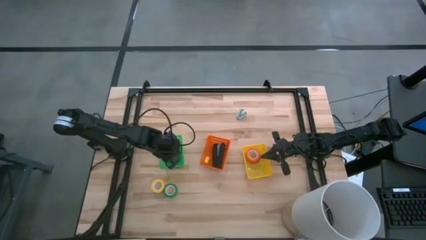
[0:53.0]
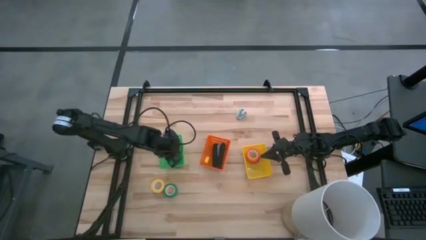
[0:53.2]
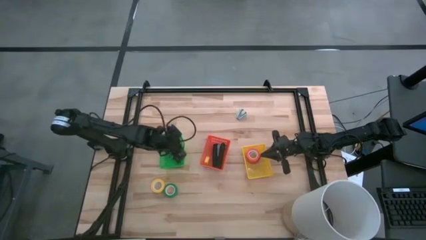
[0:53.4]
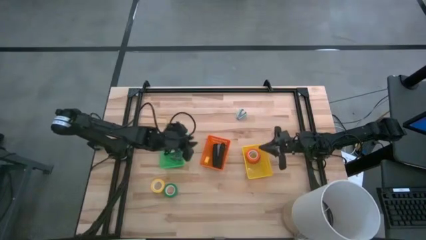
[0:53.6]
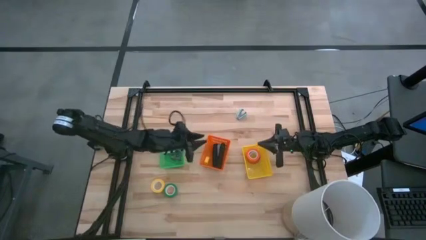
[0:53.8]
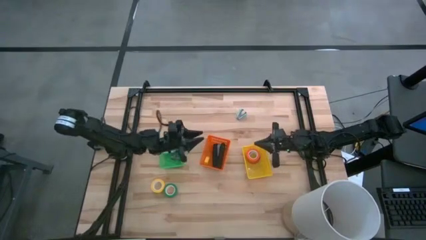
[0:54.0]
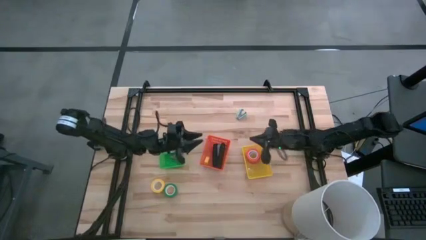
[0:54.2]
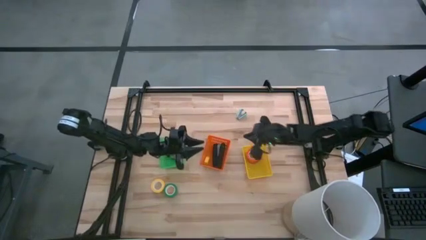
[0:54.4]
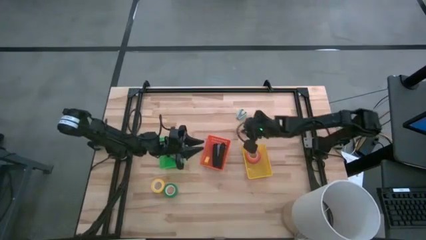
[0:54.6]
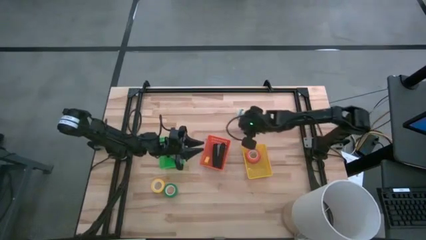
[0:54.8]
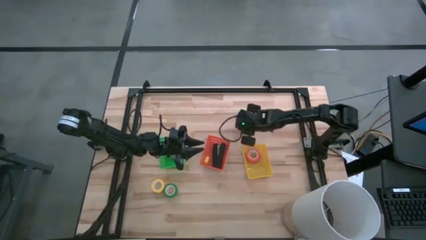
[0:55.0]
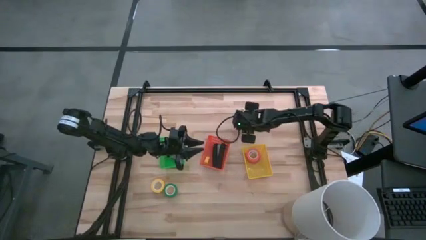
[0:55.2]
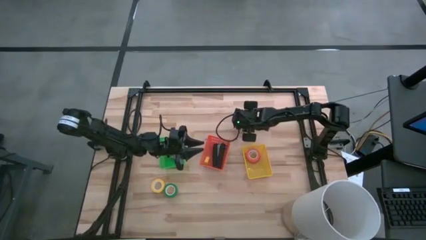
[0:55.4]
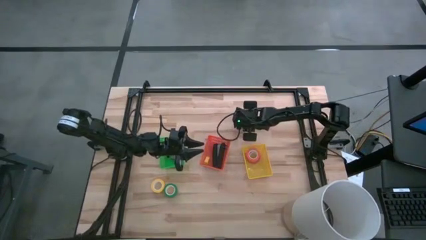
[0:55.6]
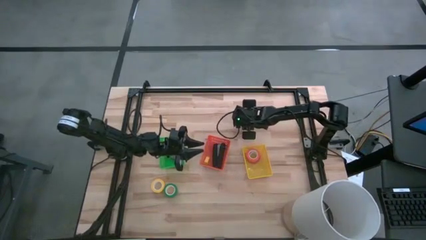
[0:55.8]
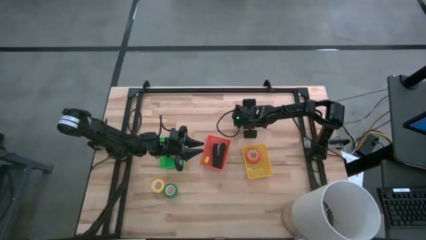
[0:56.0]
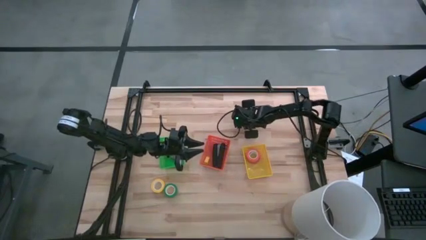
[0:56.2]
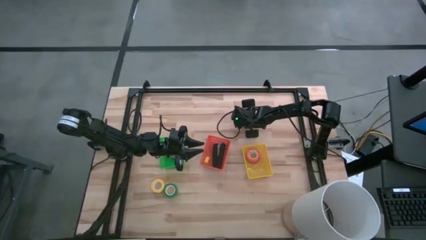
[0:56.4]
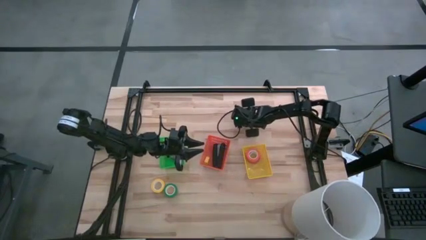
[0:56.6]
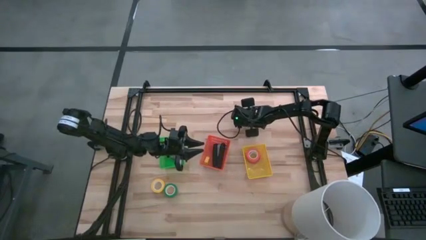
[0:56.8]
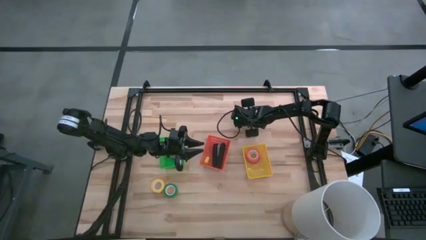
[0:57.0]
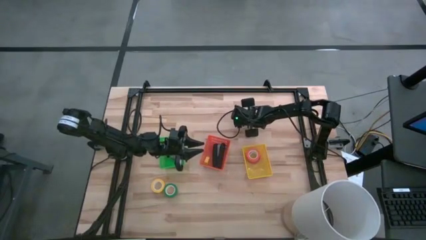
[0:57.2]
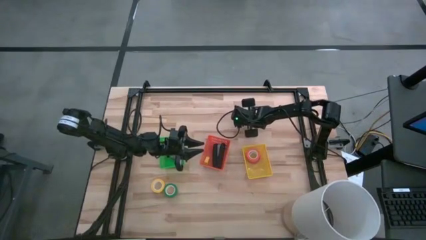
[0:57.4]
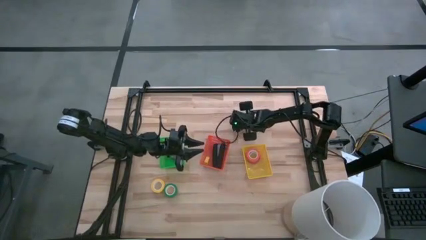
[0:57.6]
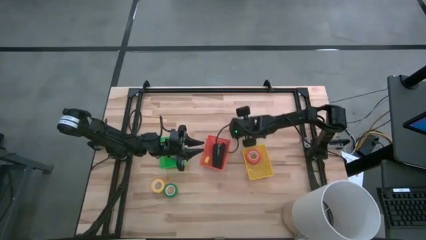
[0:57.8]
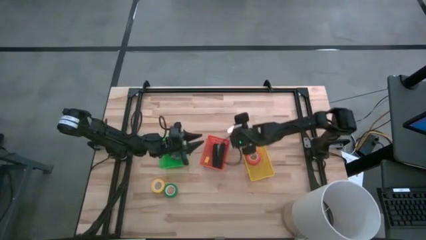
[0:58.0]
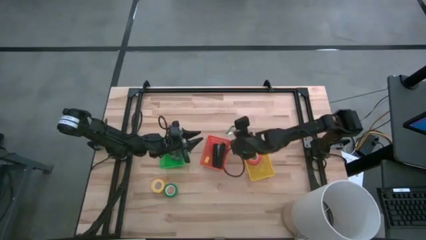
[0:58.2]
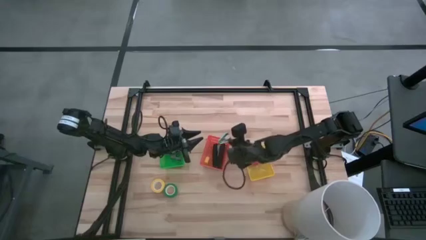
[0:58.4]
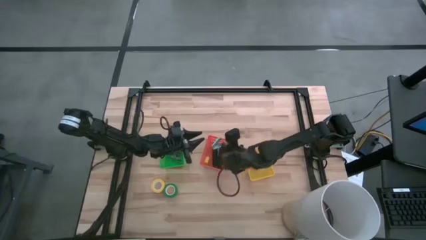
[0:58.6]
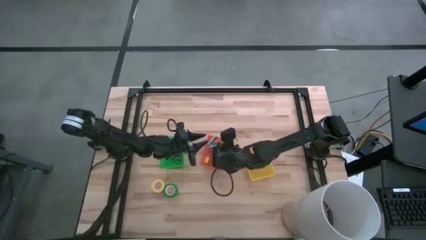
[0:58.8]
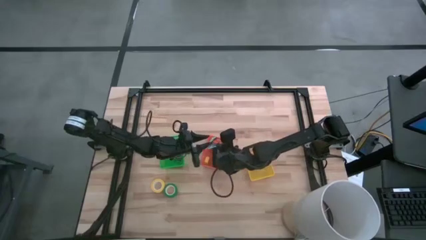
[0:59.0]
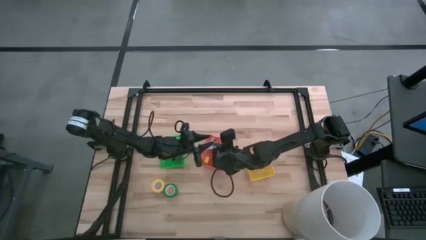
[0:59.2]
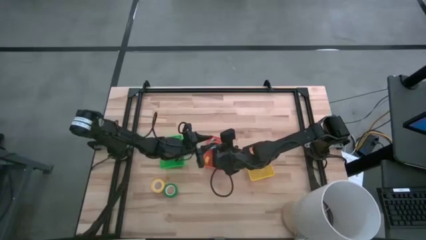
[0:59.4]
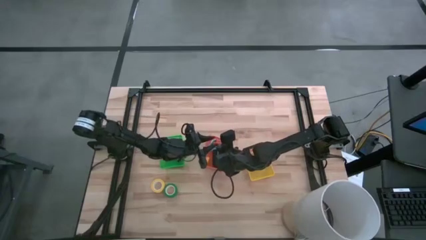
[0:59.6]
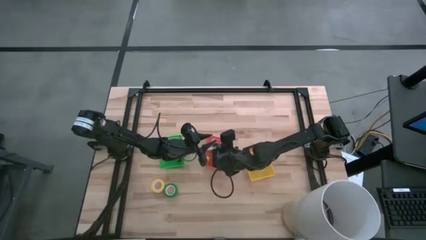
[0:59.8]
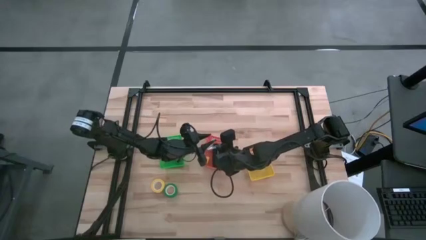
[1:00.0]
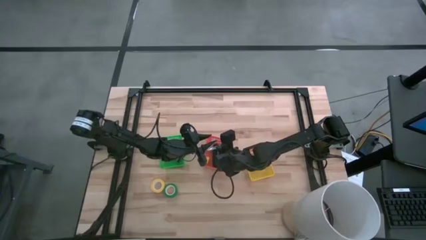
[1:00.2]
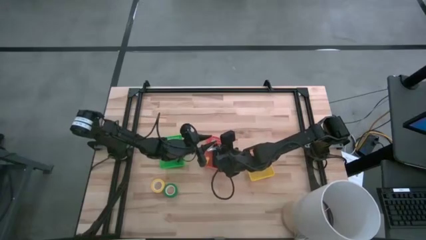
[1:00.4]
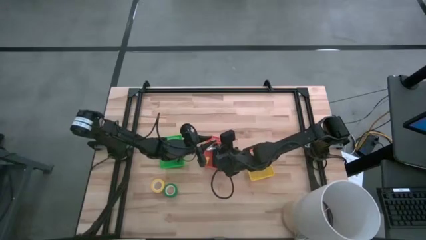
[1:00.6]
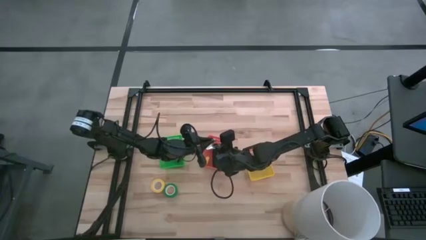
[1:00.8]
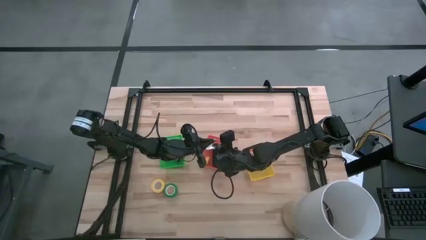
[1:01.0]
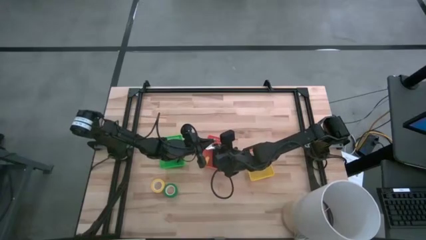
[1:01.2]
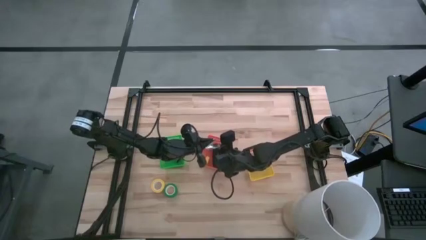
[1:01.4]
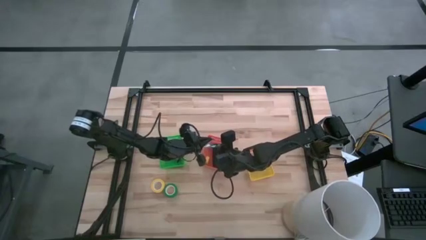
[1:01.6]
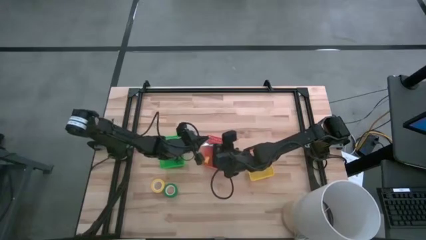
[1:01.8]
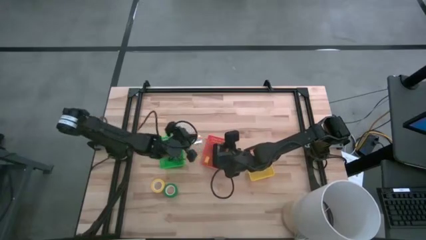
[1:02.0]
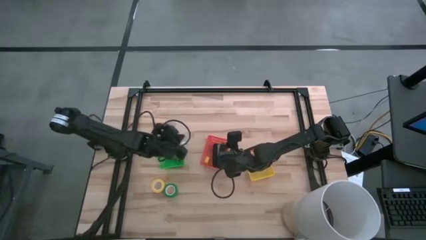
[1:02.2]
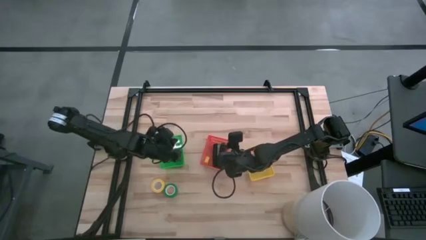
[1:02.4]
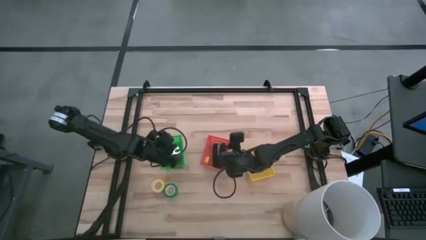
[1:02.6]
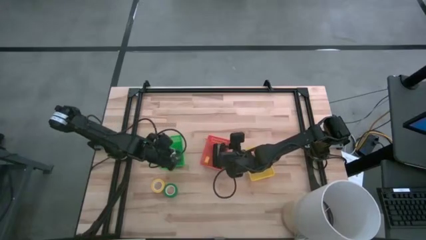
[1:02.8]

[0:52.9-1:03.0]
Task: Pick and place Stapler, Stapler remover, tape
Put the light blue staple remover into the green bin

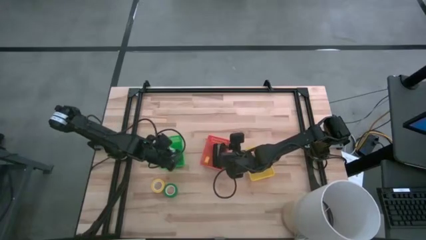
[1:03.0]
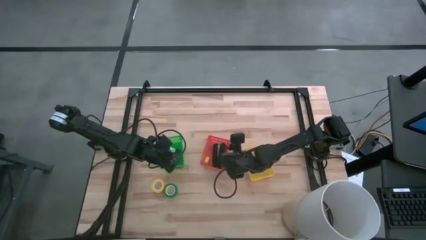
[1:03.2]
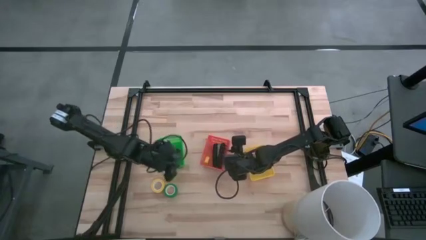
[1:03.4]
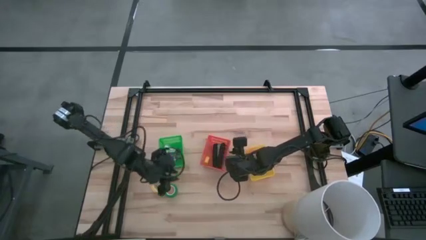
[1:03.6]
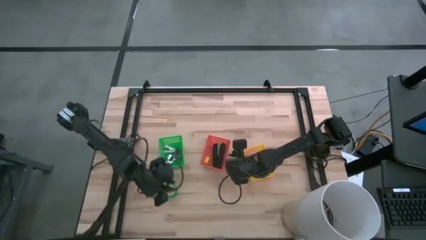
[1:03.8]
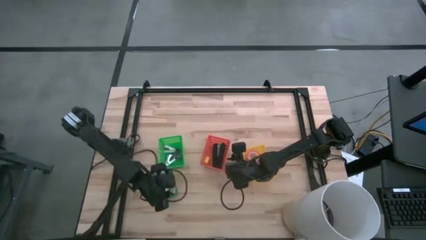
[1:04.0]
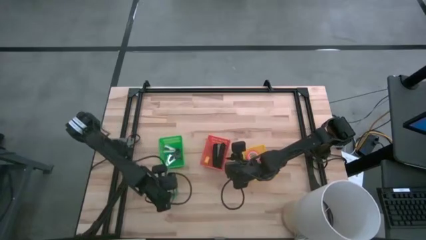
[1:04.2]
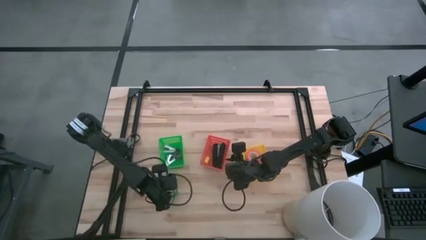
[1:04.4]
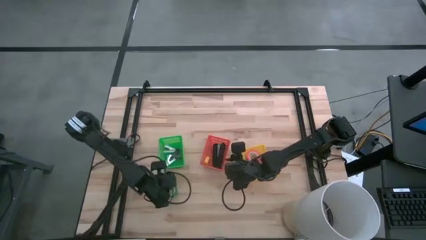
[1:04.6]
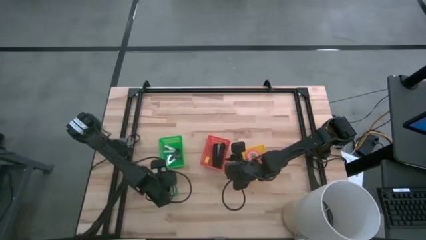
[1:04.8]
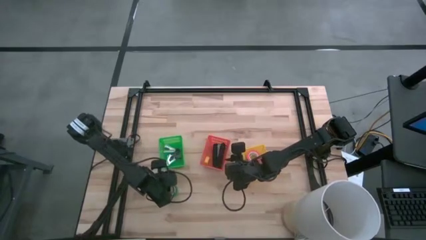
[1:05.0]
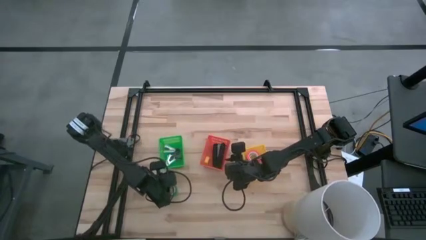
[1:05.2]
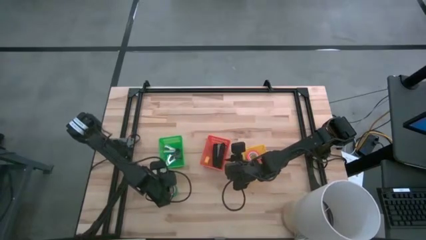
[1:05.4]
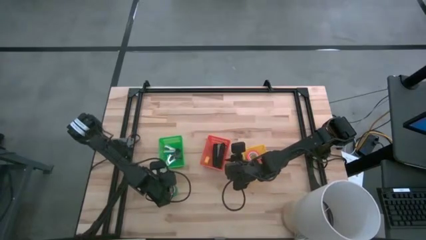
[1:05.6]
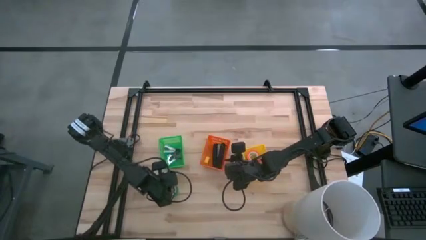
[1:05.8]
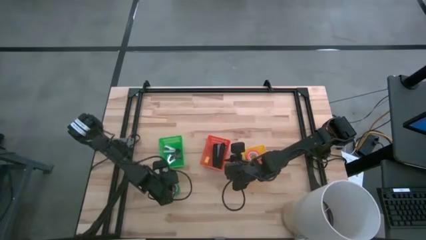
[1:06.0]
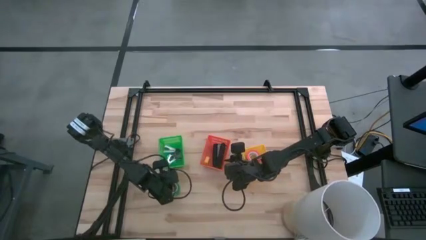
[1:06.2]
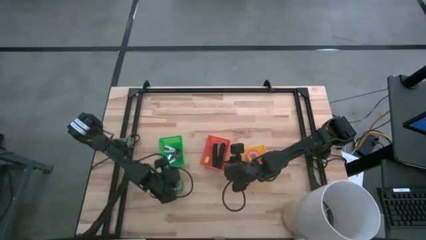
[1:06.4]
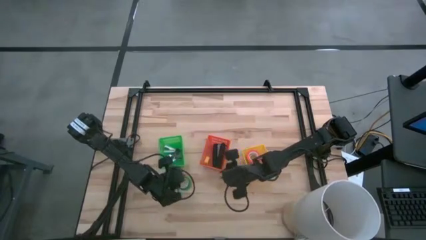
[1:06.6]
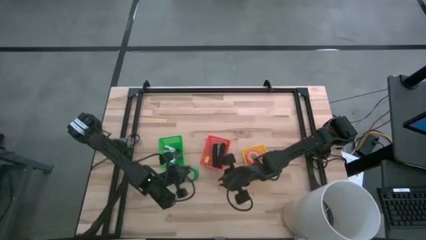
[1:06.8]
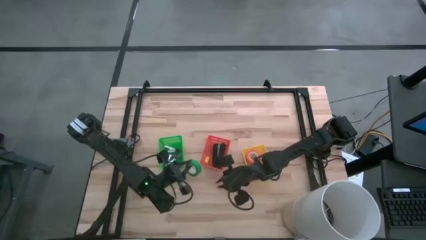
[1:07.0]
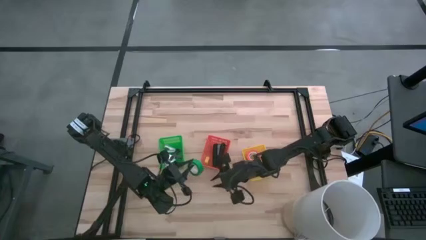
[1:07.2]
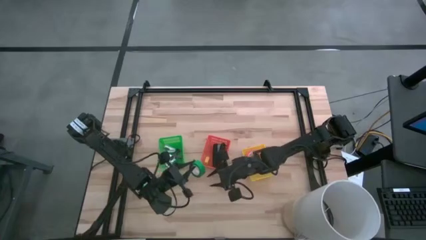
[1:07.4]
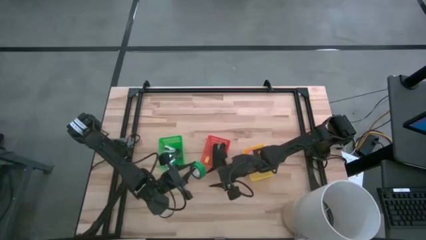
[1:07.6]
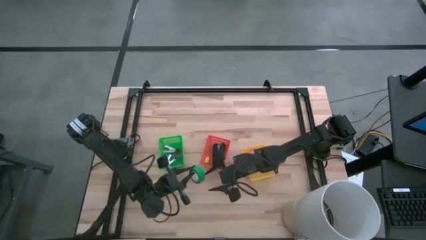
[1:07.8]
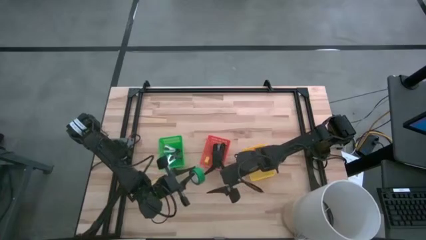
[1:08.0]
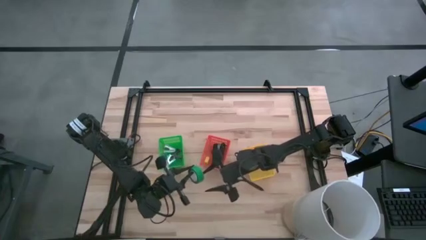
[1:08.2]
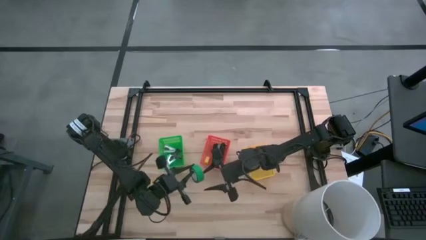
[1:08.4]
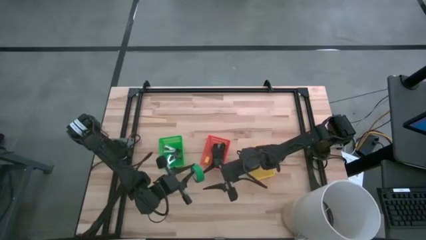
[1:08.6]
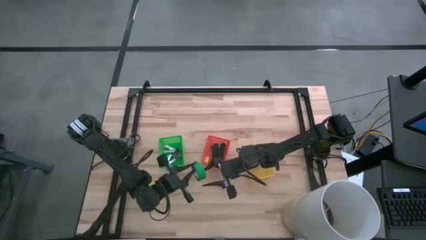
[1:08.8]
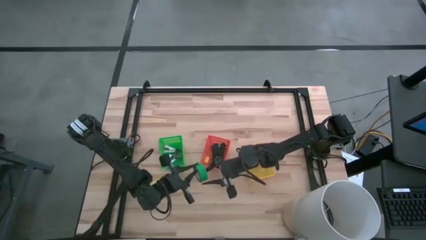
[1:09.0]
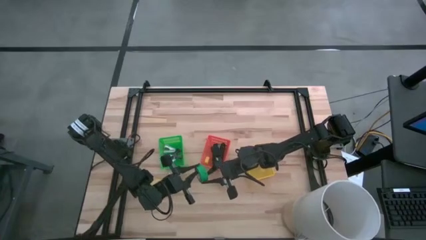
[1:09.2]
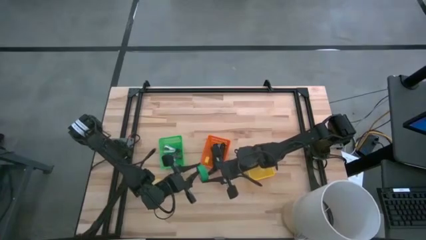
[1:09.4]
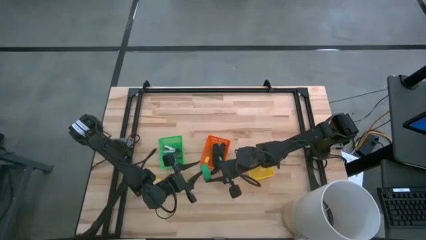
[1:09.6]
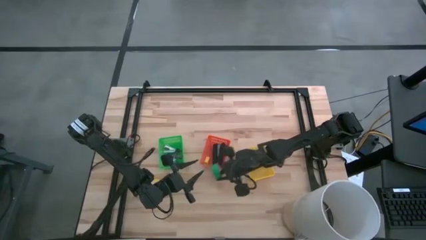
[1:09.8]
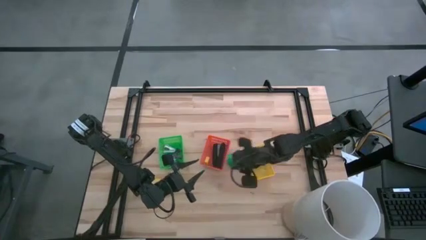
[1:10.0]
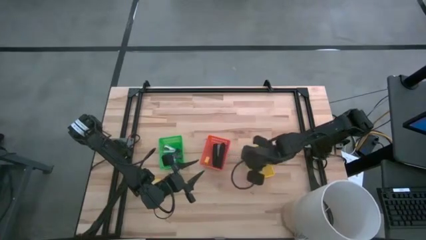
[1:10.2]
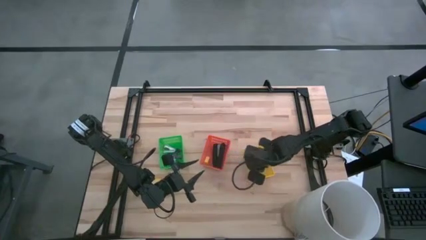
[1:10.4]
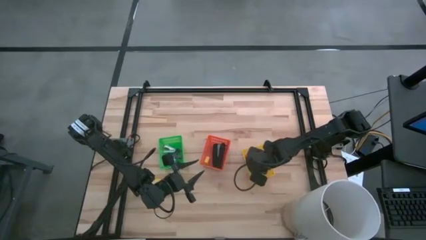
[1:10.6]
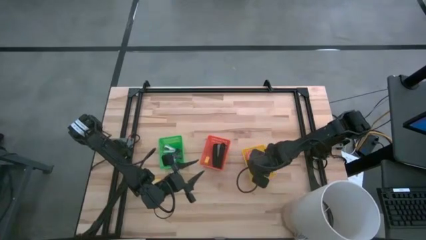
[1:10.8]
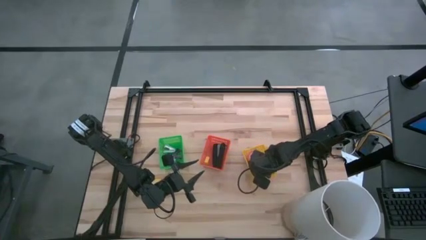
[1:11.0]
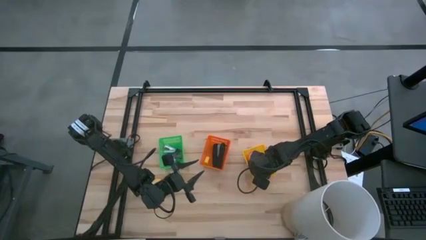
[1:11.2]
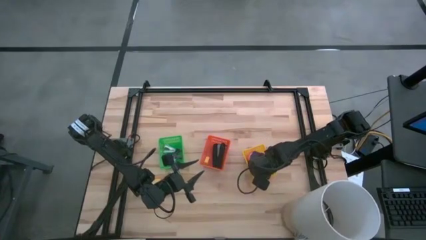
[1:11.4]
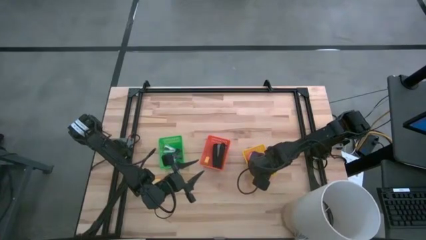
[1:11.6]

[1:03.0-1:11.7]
Put the green tape into the yellow bin
